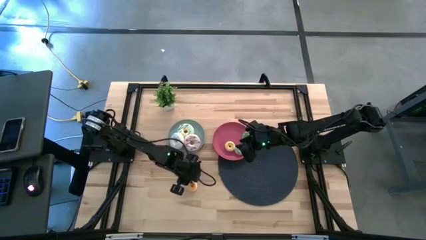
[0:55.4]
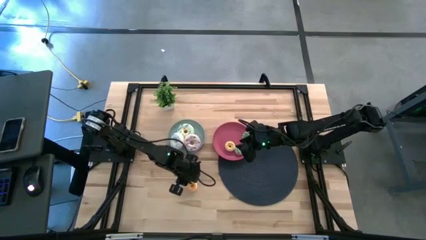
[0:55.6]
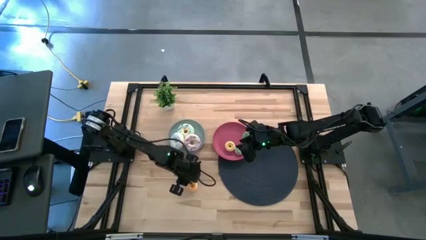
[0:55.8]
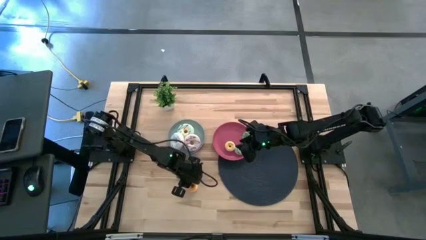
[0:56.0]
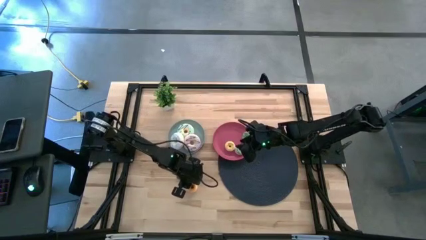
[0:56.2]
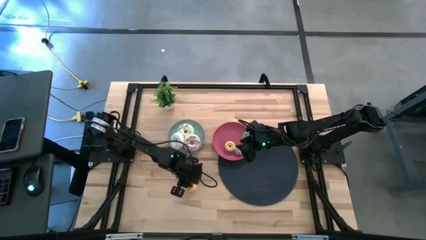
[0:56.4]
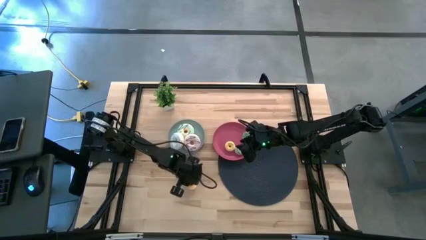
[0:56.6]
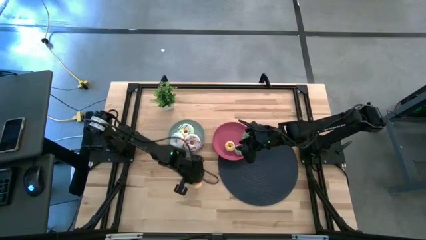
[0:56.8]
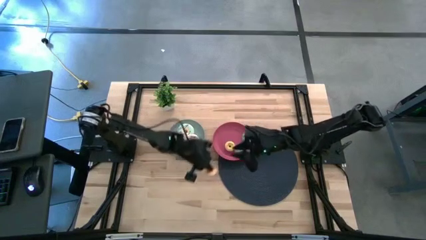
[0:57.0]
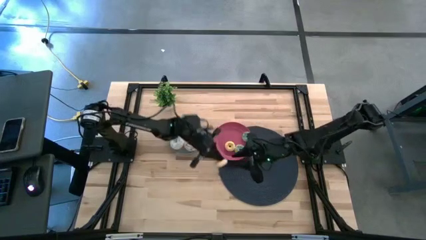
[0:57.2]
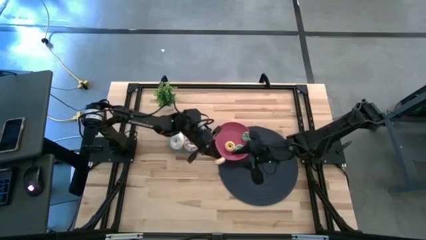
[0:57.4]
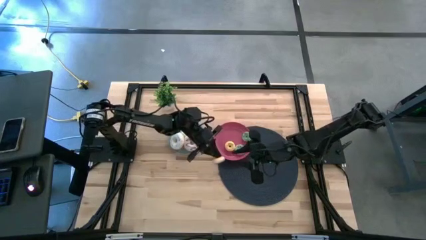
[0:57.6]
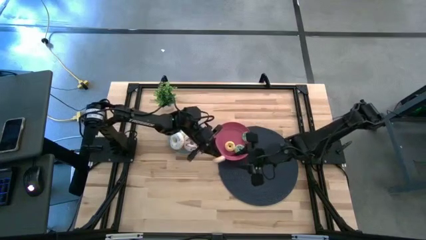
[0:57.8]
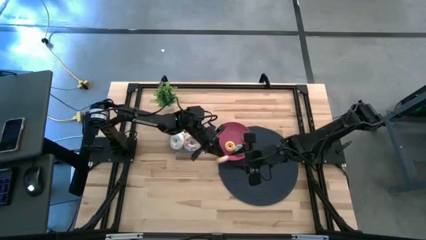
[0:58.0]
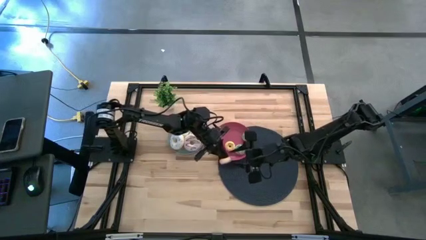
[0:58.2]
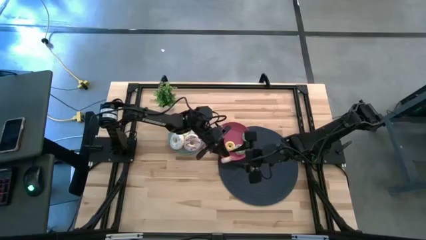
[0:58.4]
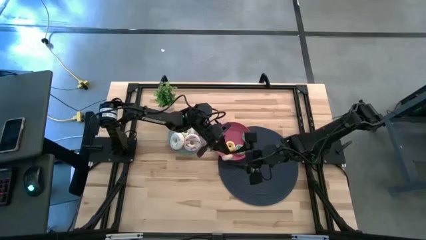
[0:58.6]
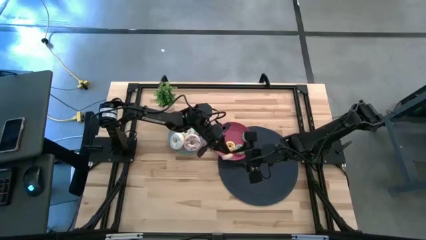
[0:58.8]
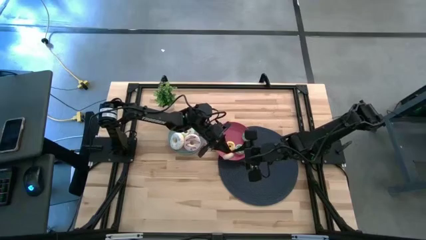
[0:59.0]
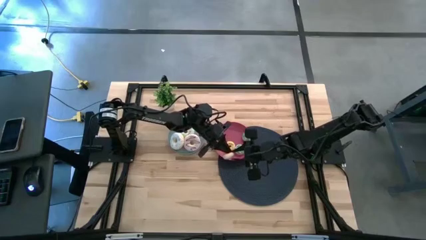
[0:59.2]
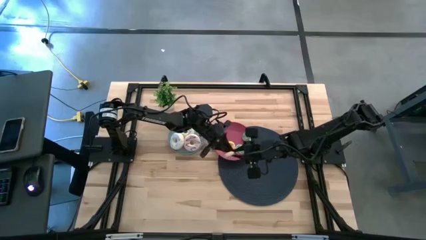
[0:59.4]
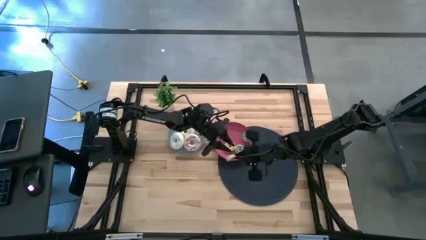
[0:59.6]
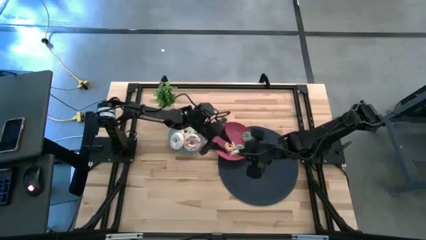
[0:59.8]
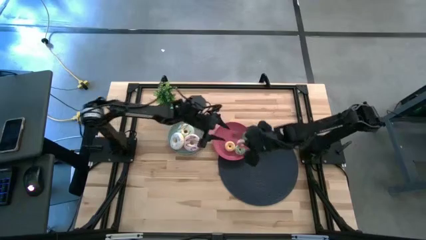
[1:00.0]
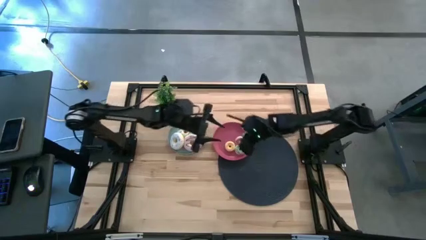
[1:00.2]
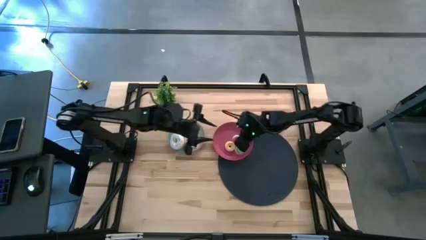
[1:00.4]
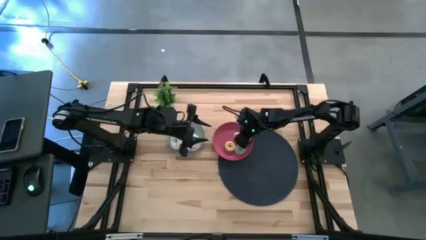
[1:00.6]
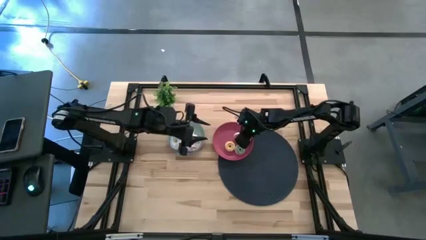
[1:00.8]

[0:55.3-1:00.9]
Task: Pick & Place donuts
Put the small pink donut on the red plate

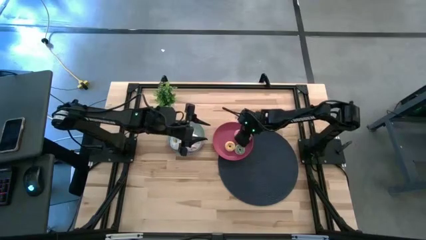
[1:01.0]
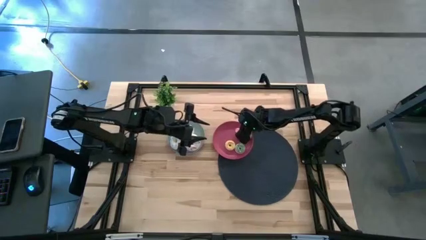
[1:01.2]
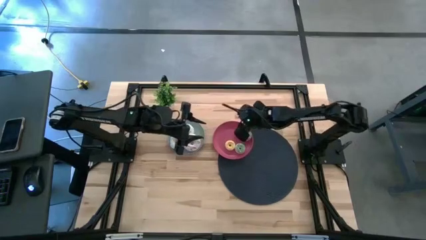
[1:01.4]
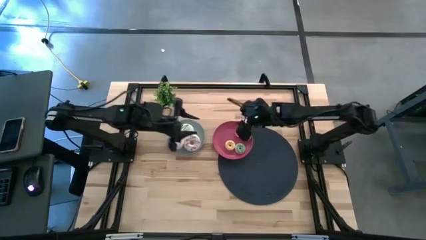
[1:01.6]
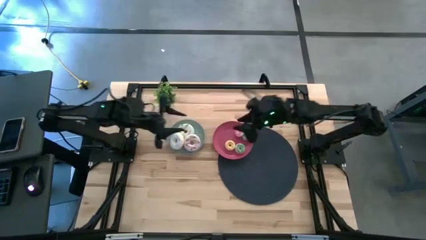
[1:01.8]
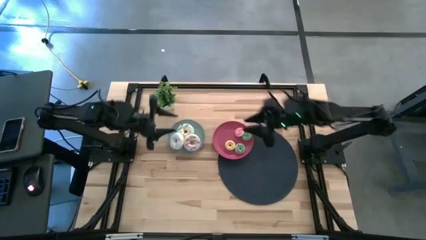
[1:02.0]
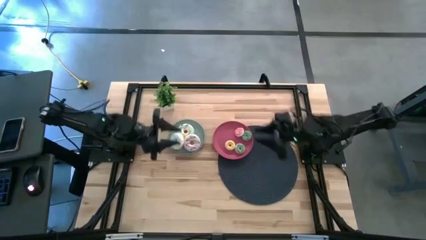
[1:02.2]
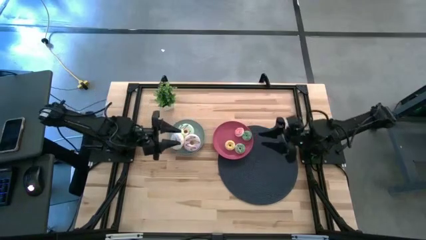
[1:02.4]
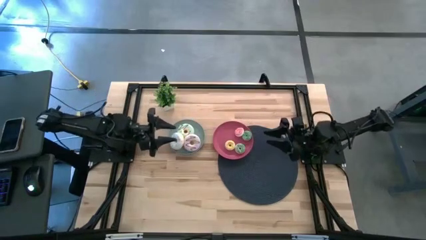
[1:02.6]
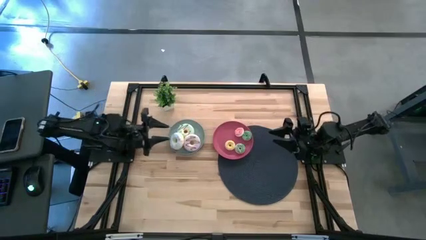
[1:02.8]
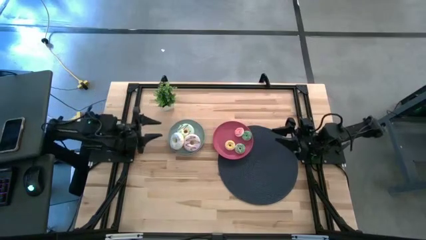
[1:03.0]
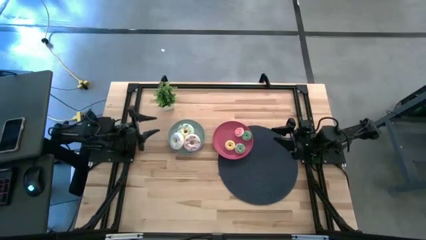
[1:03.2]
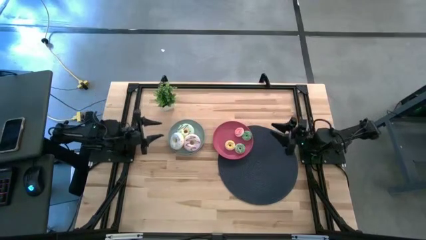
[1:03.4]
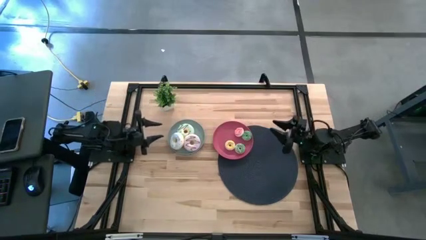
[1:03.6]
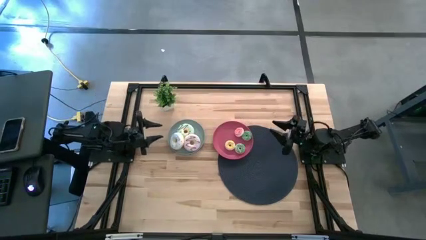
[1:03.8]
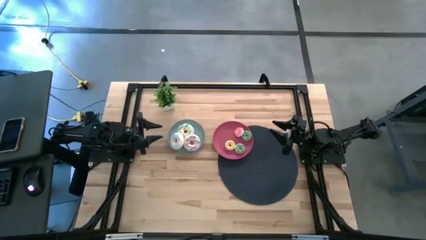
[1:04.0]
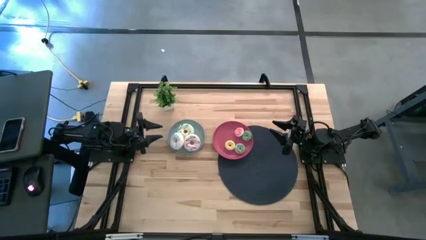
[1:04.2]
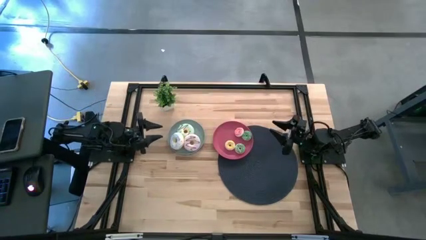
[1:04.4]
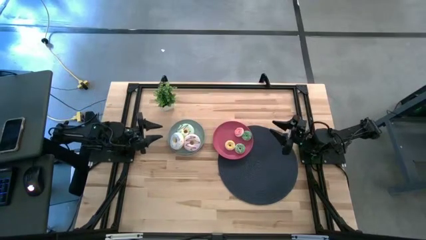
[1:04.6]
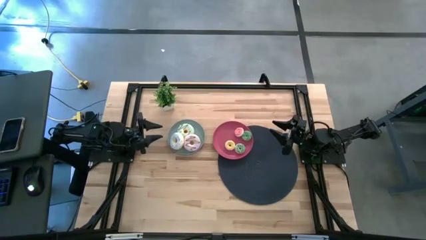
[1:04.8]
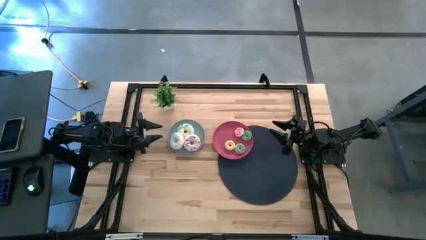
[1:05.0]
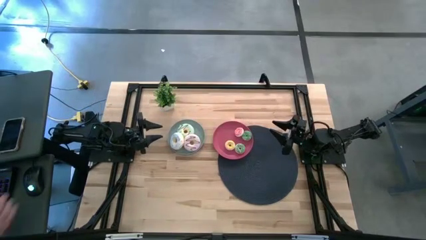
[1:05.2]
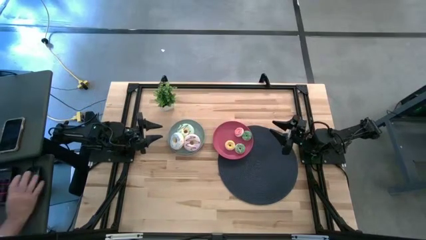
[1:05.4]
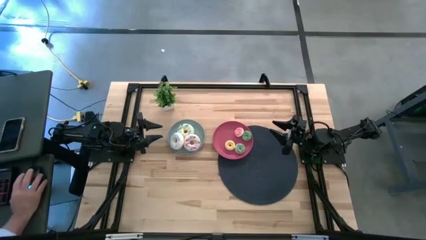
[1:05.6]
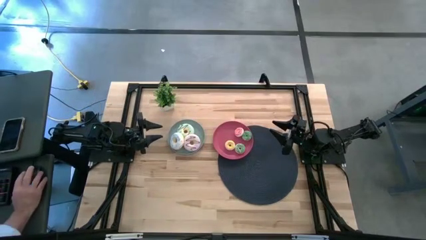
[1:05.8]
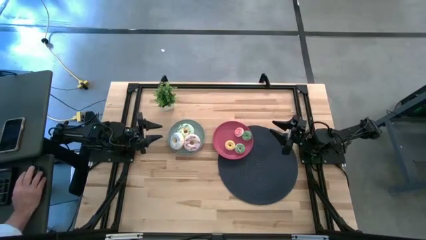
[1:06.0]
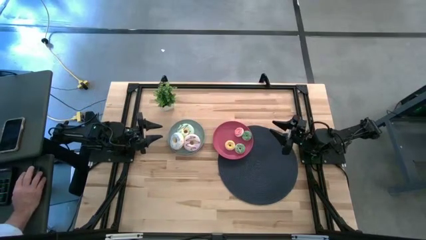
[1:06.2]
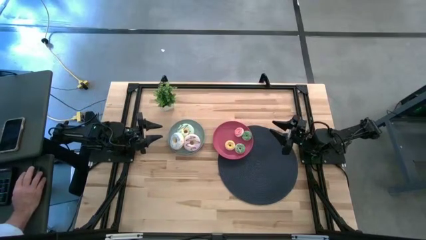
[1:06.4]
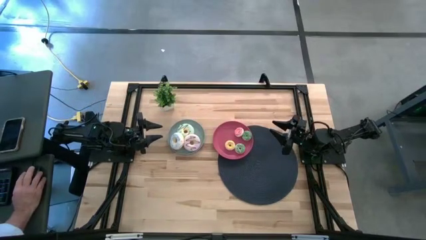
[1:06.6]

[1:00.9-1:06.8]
Return to Home Position

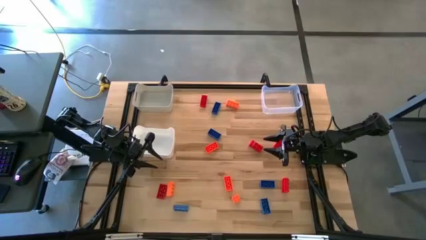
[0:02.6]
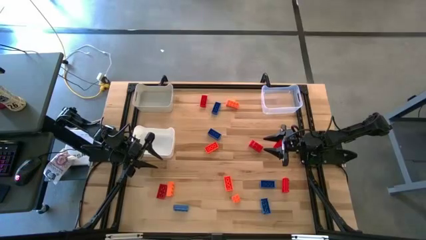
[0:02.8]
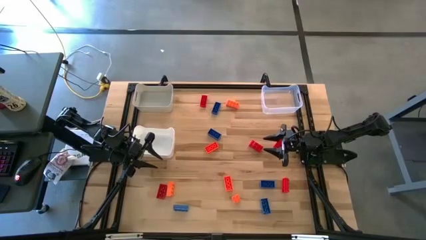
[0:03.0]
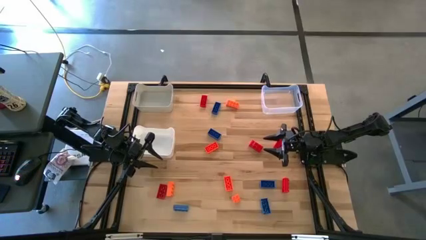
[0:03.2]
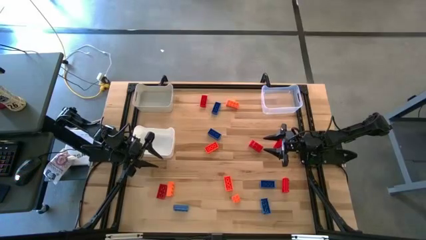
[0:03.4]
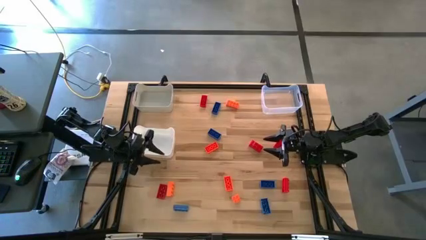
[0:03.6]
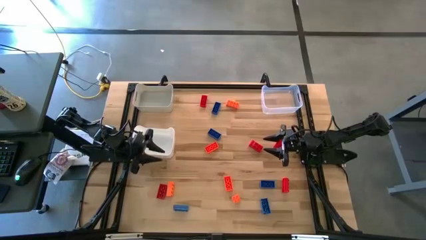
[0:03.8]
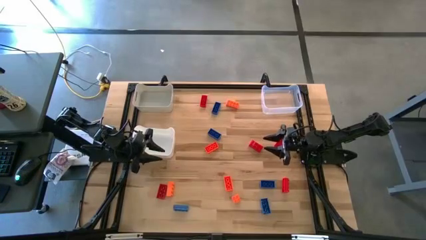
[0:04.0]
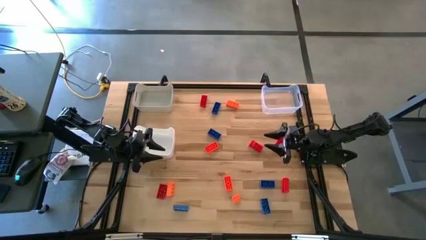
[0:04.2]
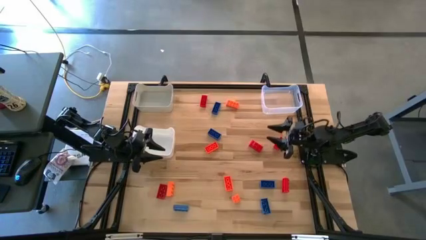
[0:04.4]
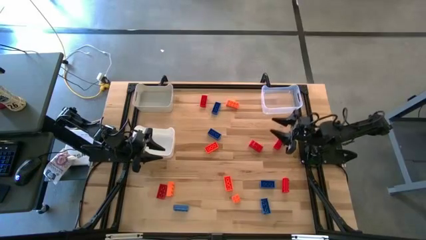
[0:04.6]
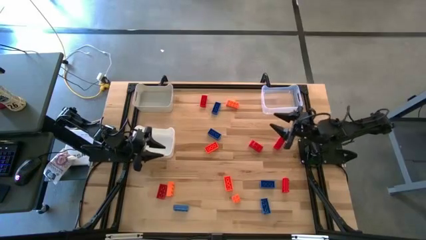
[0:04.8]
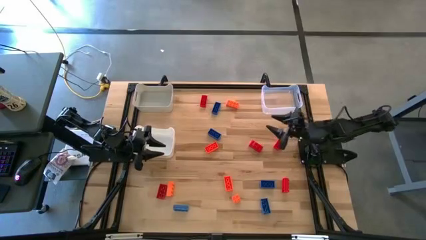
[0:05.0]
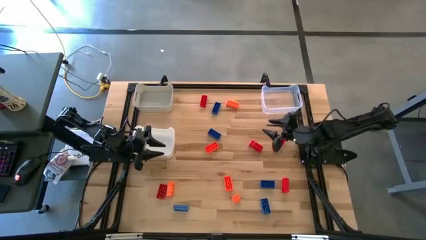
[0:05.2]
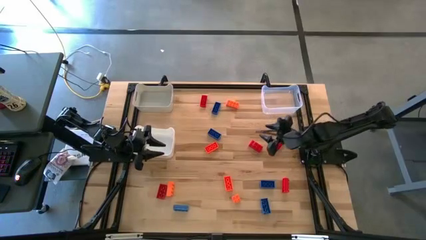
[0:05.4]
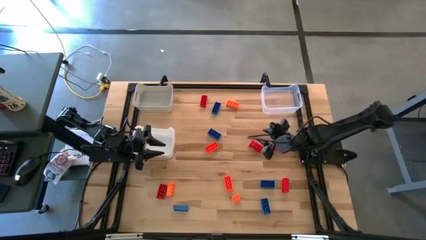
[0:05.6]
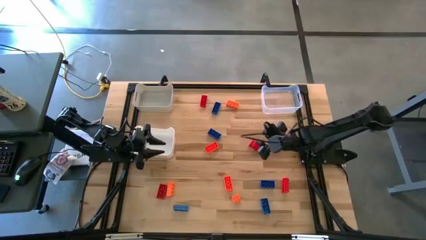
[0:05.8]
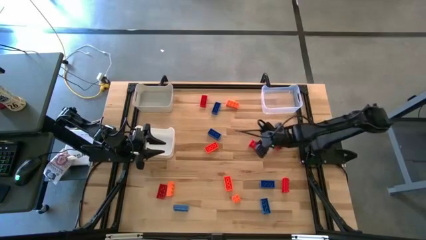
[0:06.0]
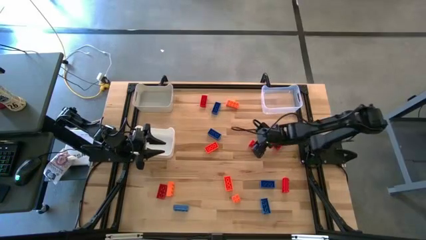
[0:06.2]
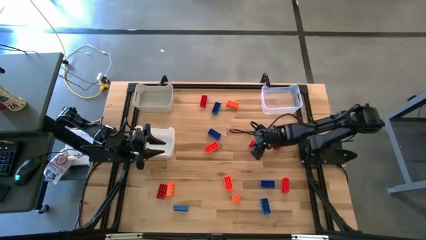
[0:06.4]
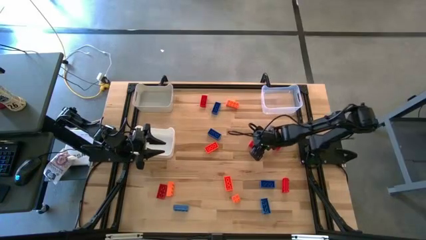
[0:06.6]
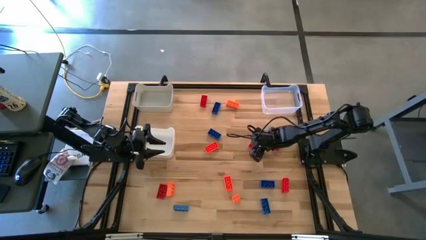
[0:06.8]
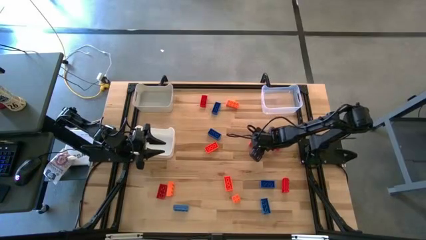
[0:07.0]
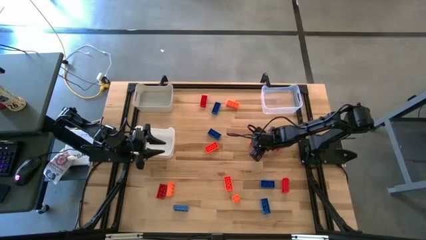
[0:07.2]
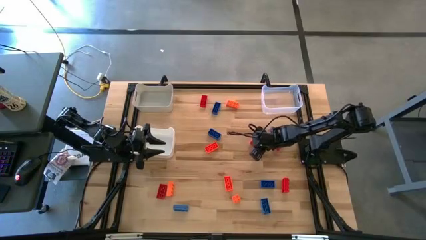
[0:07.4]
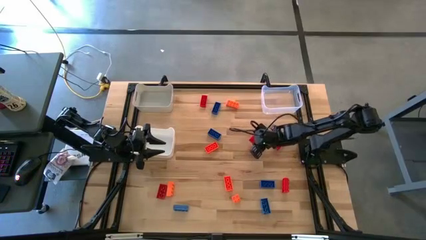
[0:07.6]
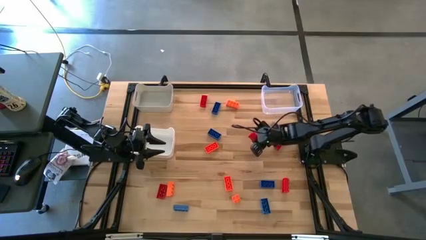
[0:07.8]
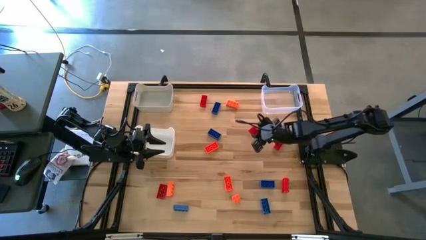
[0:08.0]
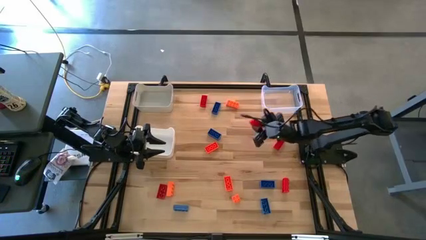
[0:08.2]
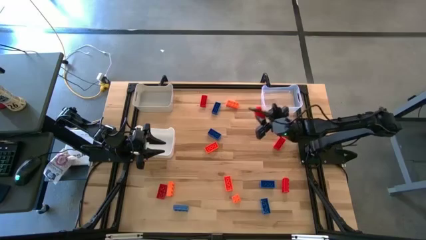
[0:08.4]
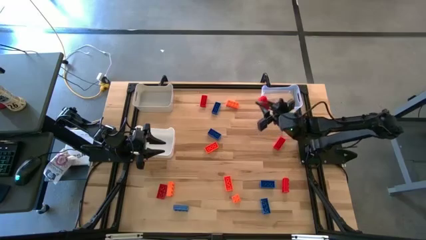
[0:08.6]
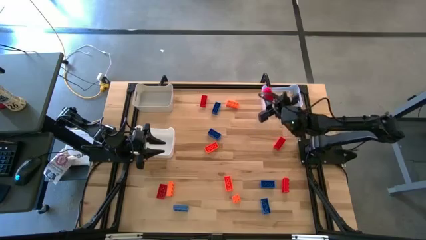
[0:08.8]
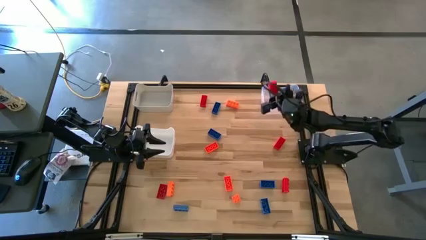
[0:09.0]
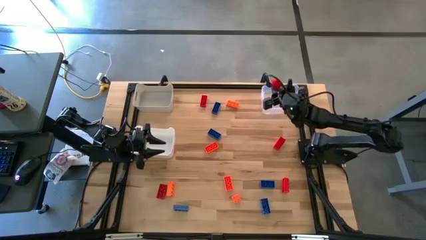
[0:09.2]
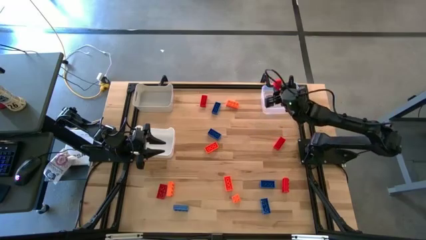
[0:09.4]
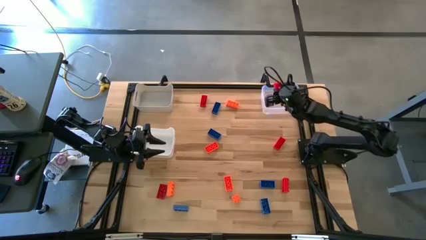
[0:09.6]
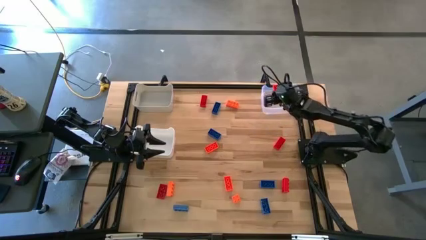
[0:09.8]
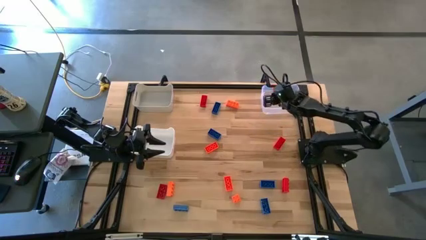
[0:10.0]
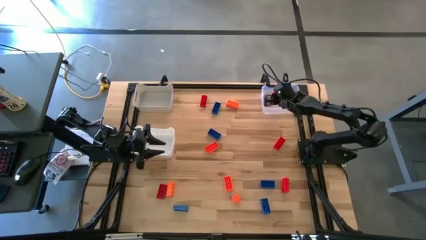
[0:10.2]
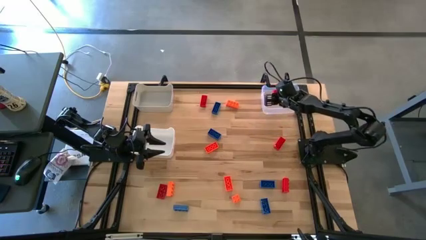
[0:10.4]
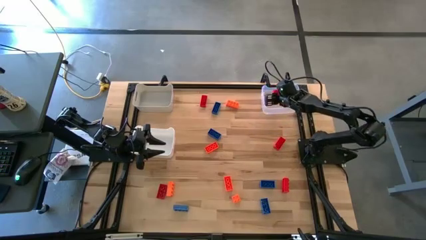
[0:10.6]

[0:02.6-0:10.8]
Task: Sort & place blocks by color
Put the red game piece into the transparent bin
